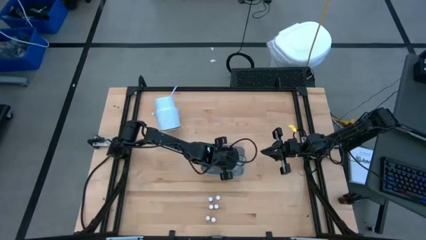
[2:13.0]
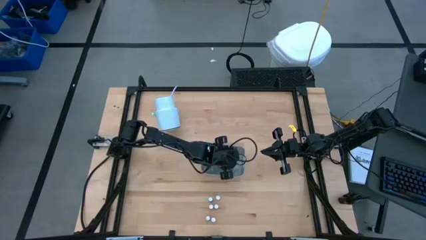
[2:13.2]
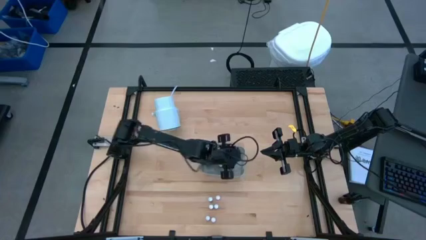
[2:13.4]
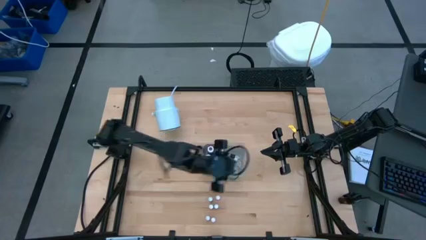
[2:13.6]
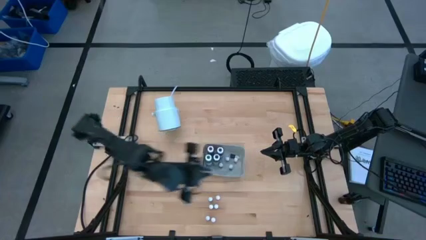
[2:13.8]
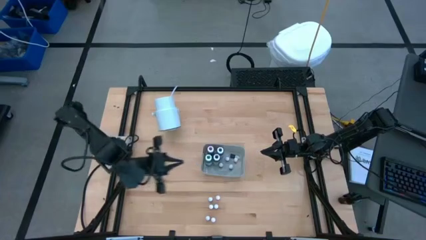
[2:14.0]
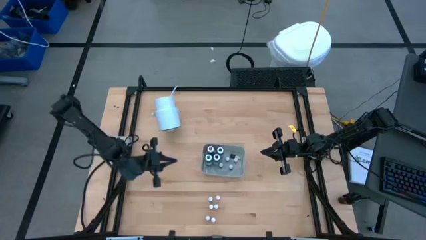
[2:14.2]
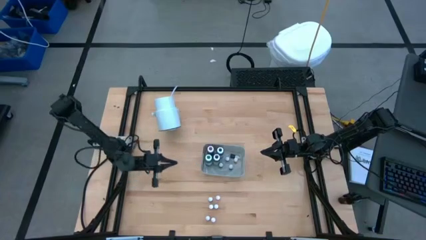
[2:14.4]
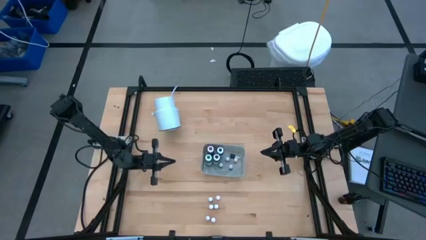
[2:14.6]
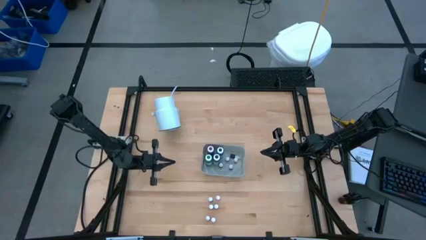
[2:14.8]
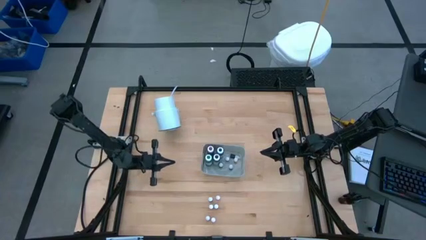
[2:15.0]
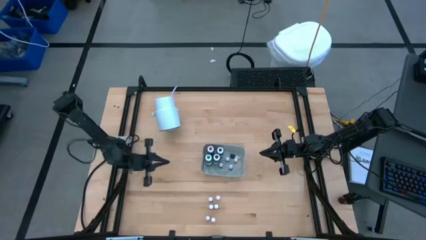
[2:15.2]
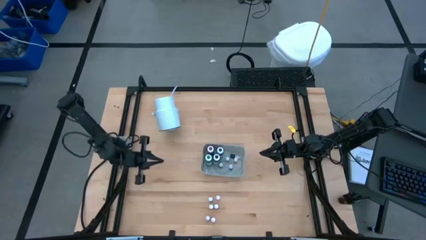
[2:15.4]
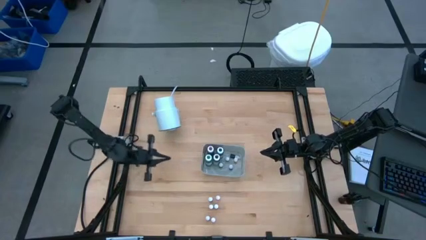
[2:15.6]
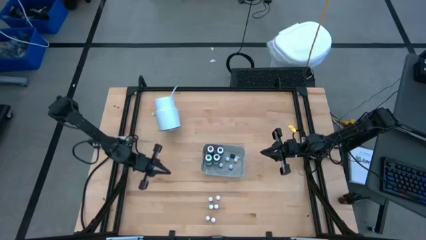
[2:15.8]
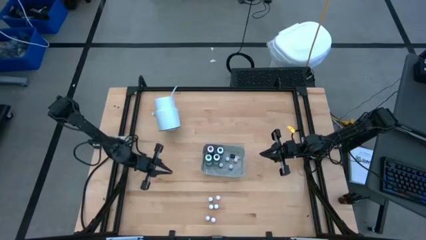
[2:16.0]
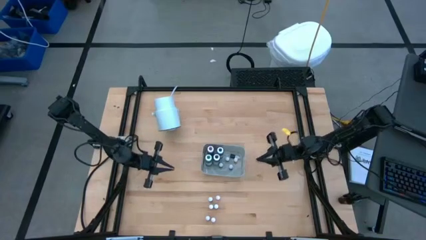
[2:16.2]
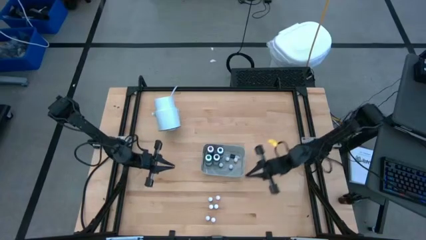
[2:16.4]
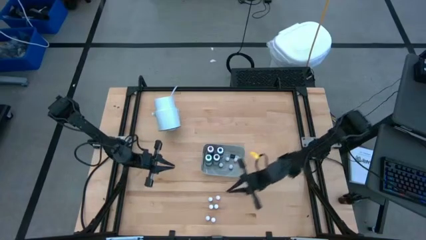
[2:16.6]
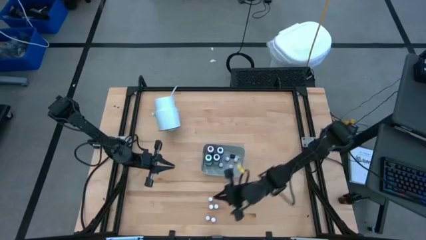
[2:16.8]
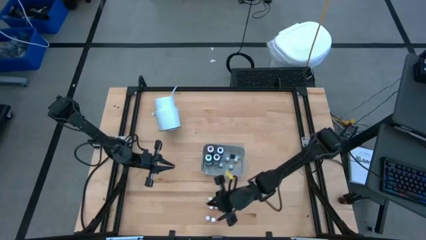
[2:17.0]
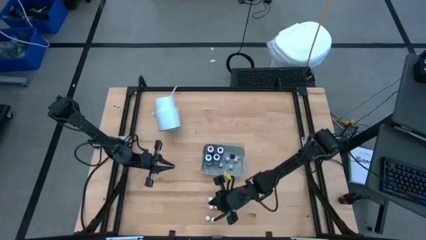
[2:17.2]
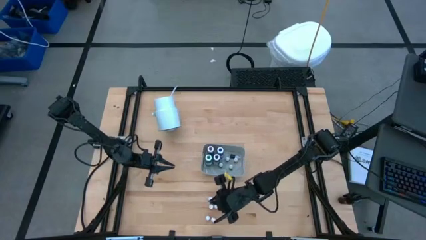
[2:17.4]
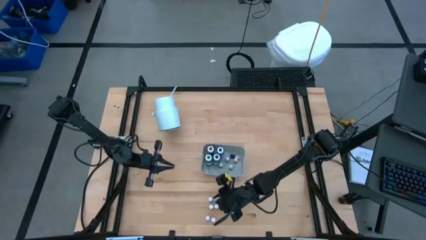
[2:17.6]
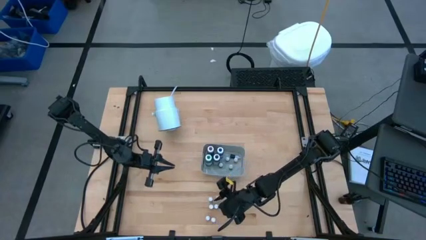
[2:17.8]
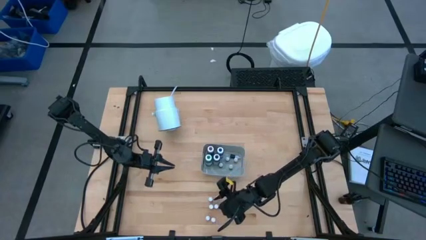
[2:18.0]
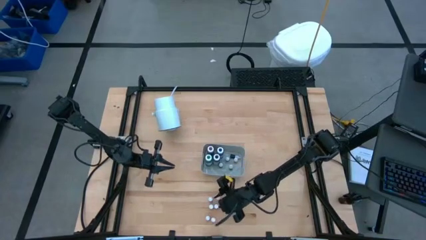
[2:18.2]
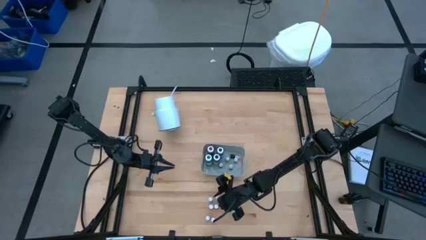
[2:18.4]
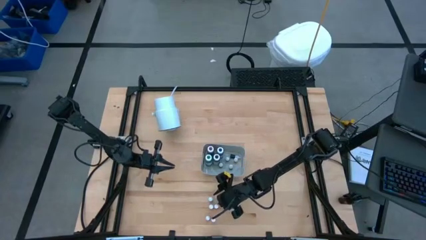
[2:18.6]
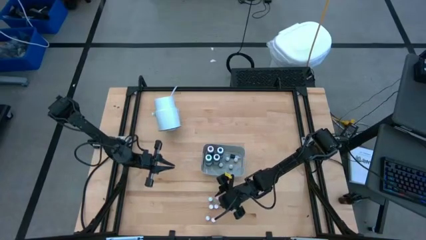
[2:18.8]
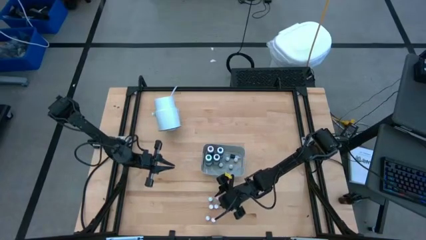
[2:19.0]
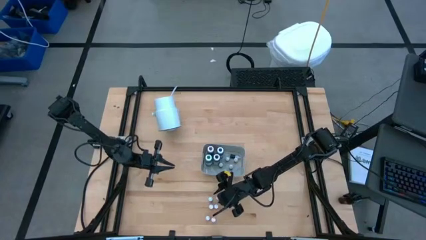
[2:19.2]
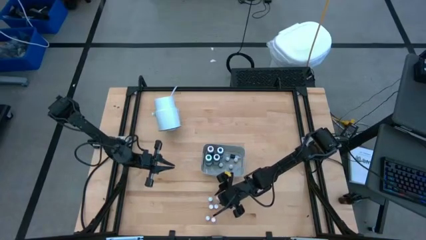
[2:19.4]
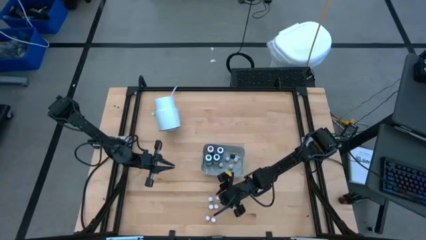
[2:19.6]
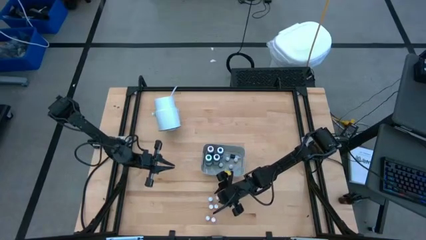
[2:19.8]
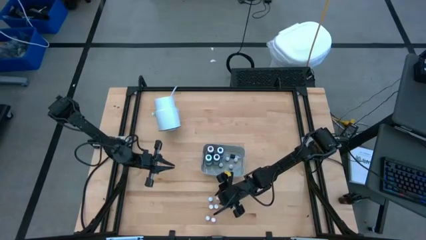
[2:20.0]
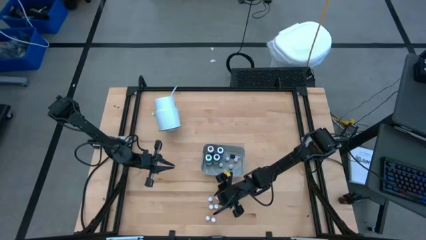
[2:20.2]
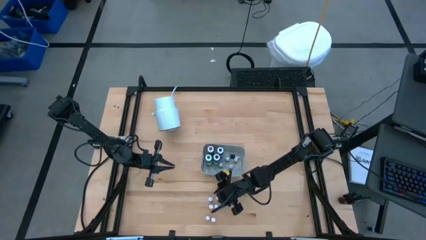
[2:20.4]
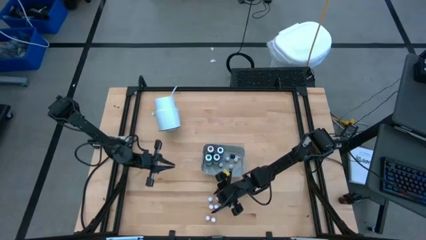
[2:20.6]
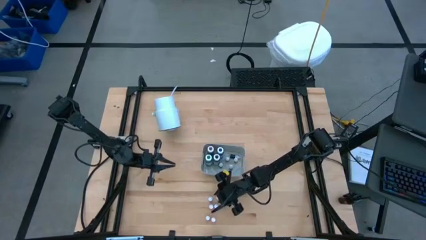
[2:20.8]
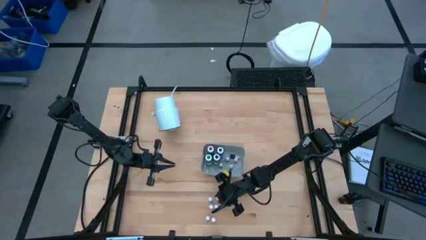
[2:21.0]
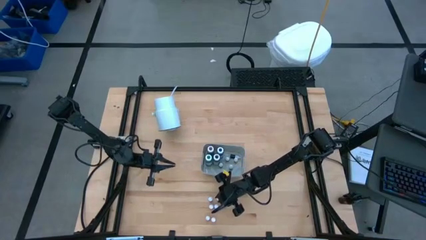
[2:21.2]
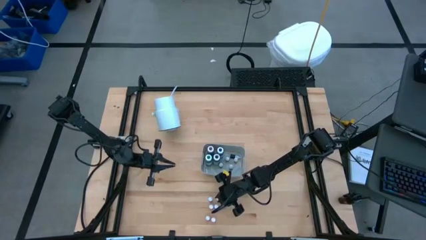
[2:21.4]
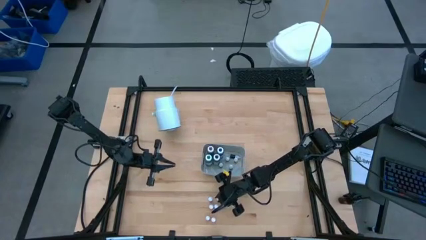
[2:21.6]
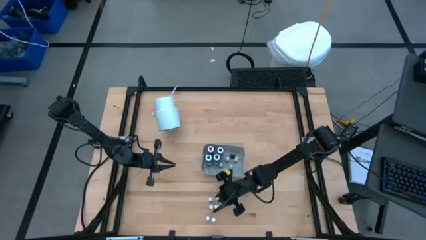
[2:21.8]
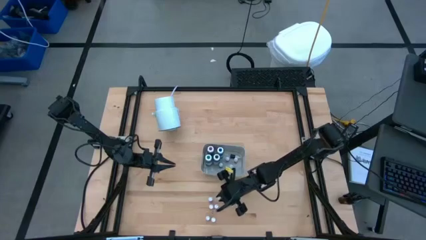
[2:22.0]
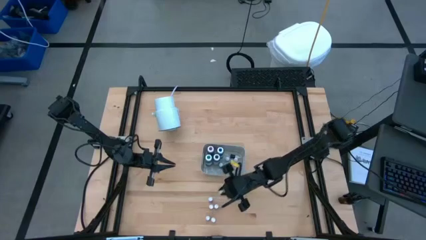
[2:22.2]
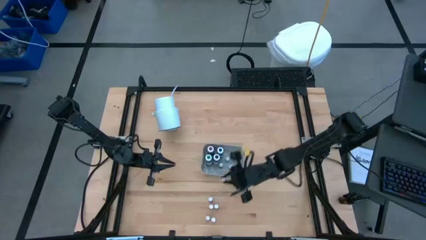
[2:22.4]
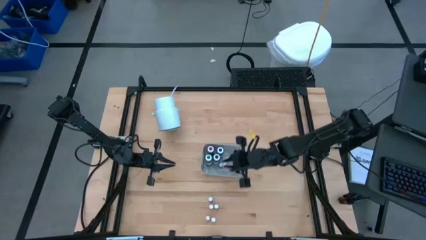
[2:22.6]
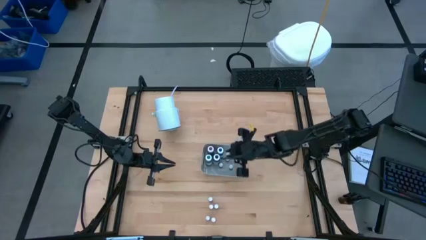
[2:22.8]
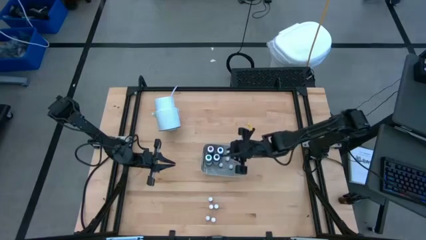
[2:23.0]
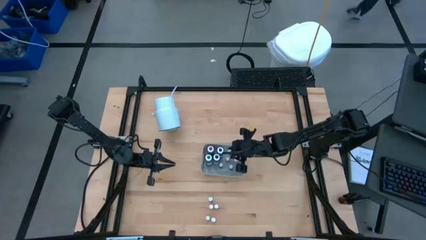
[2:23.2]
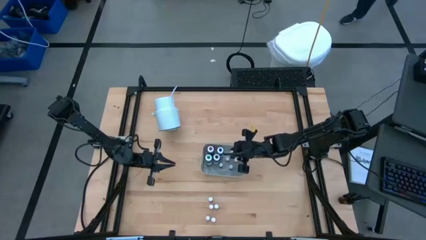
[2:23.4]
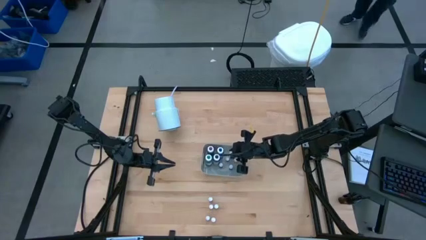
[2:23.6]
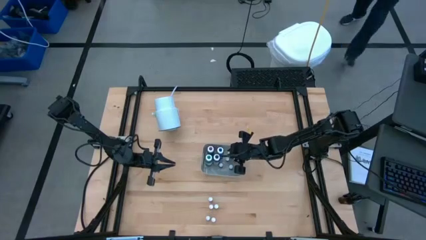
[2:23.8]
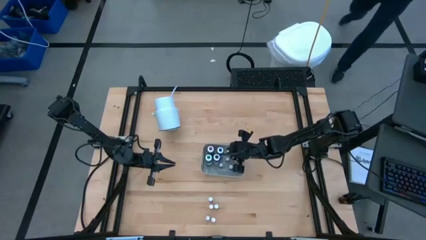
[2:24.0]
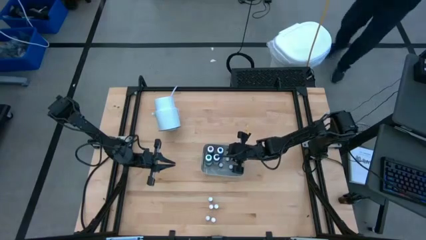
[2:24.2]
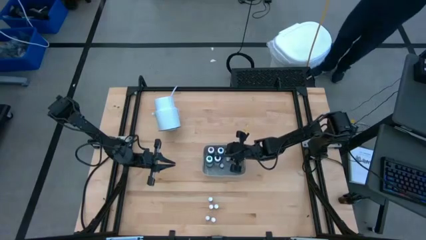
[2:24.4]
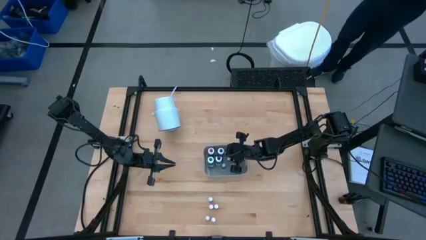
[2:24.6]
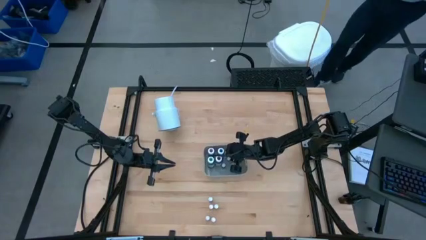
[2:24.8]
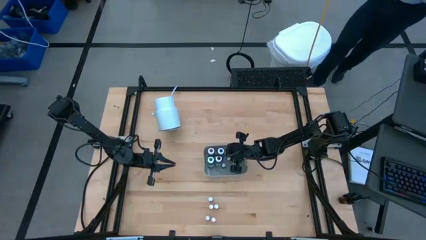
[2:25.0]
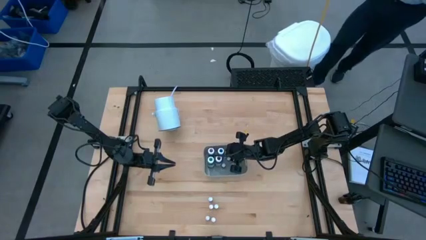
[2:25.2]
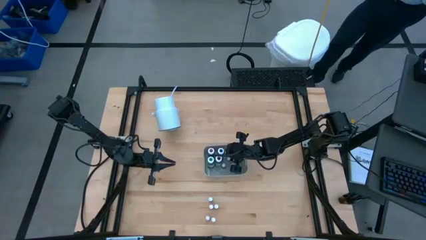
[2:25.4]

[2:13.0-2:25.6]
Task: Pick & Place food coloring
Put the top small orange food coloring bottle into the bin

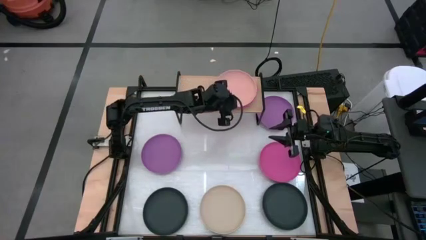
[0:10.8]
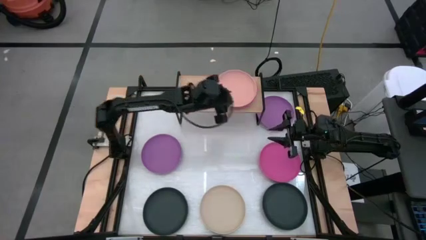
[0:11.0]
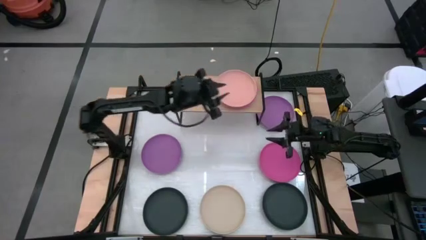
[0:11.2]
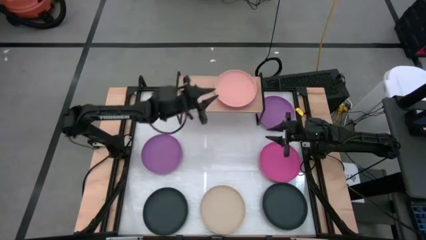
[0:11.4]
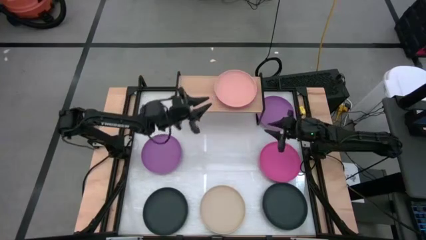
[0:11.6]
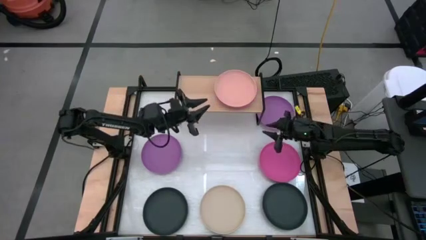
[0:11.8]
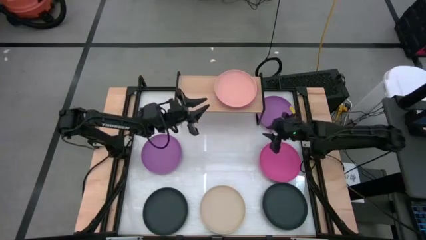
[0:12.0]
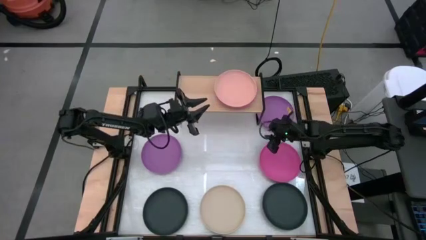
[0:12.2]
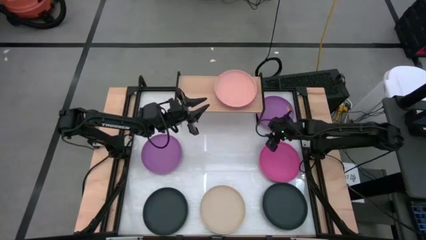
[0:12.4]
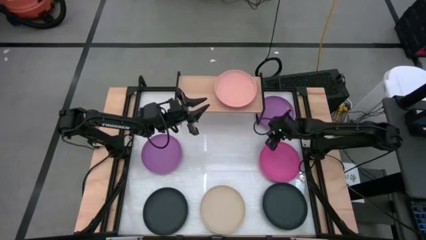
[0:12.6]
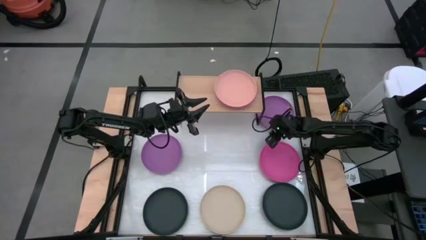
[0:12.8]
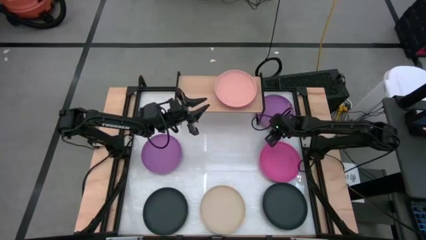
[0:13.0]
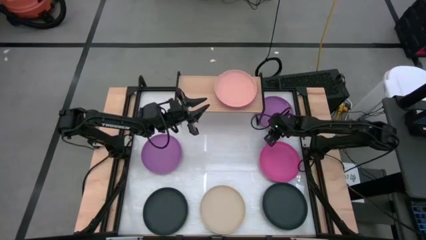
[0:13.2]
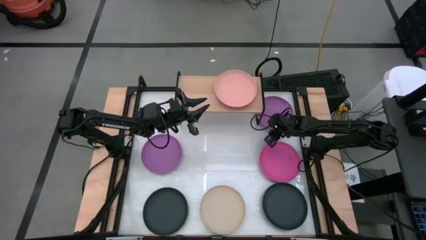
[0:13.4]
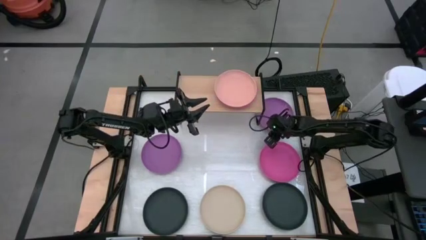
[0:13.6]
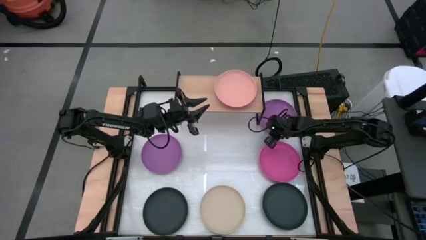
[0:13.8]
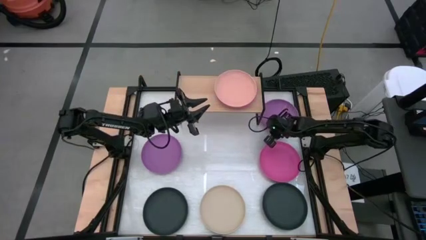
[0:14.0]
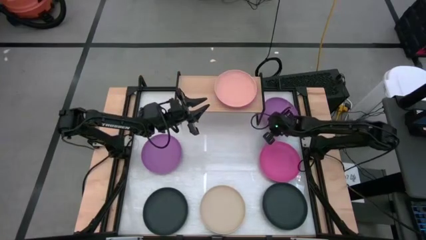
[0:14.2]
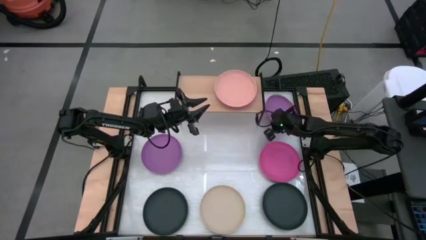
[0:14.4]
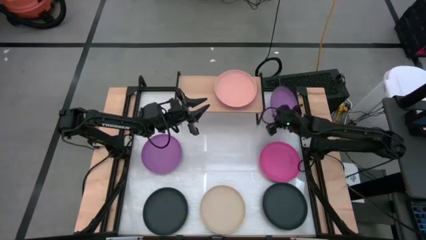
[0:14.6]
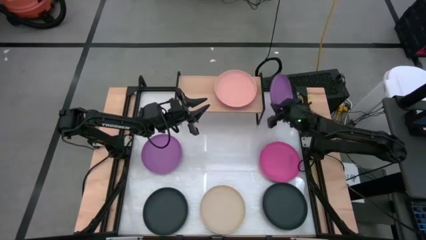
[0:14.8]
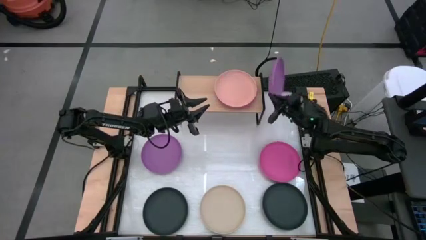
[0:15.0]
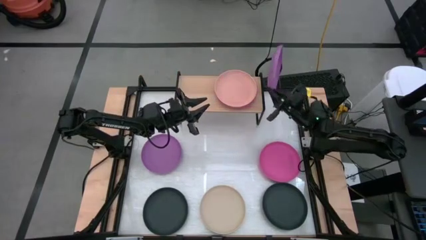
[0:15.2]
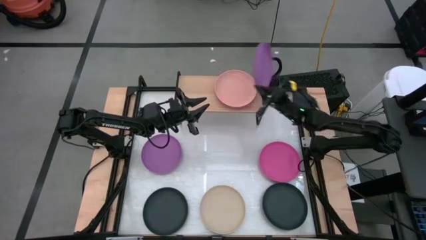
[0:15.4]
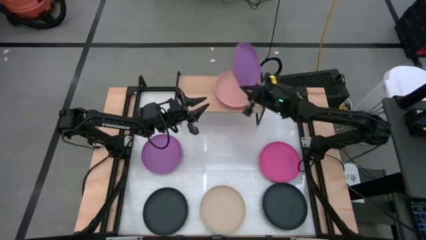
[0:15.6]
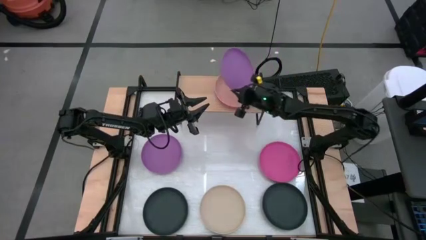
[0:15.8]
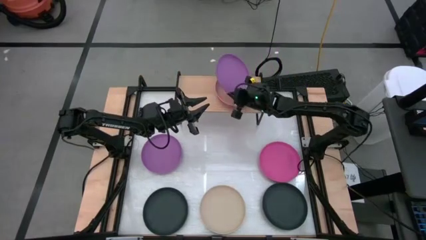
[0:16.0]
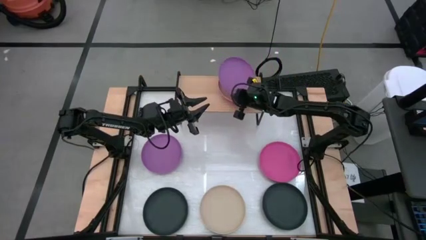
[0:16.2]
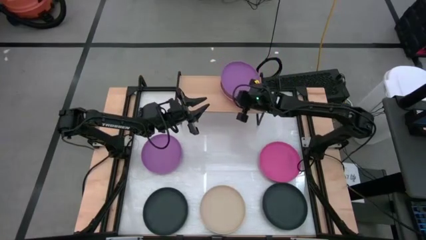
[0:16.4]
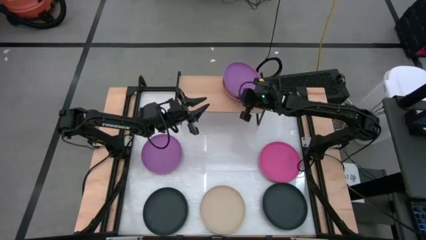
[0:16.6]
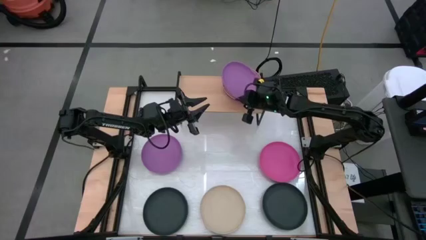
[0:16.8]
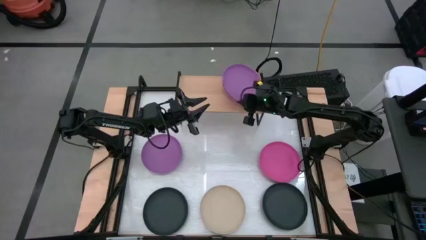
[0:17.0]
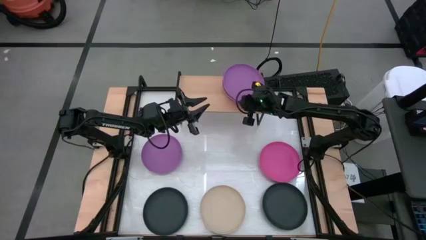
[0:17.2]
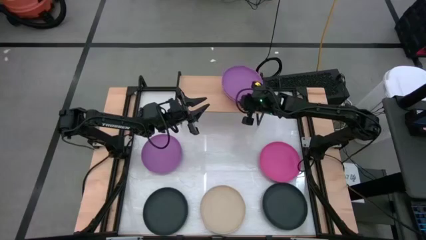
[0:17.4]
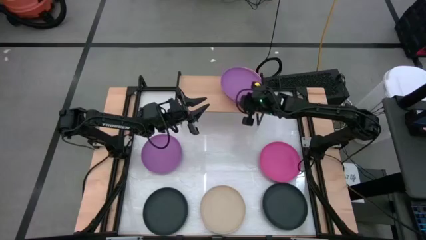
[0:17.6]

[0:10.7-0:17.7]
Task: Place and stack plates onto a shelf
Stack the right purple plate on top of the light orange plate on the shelf
